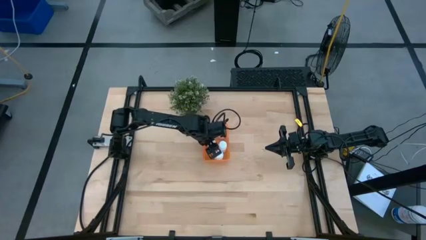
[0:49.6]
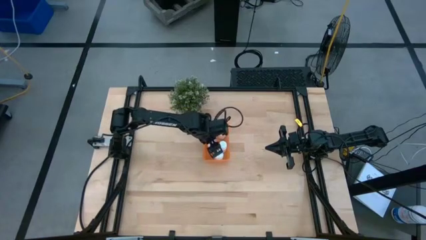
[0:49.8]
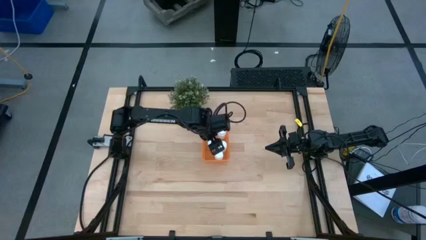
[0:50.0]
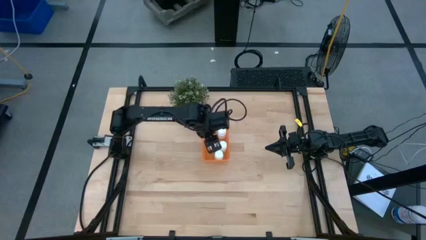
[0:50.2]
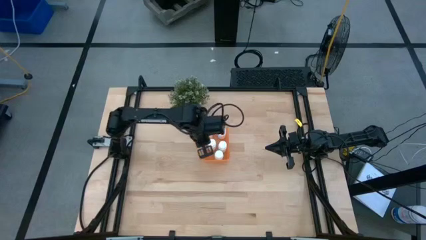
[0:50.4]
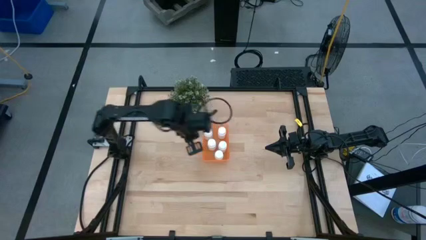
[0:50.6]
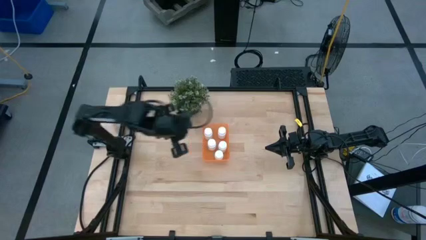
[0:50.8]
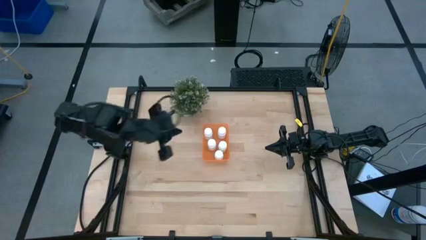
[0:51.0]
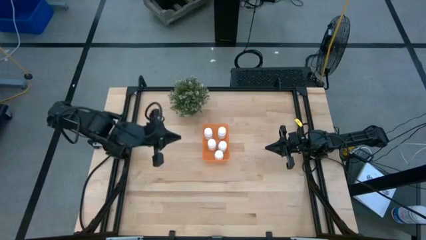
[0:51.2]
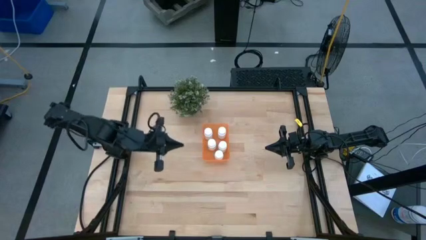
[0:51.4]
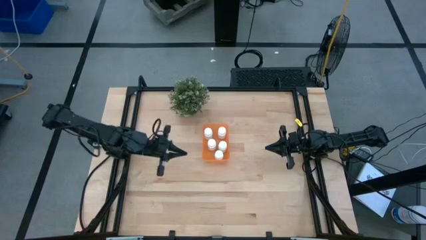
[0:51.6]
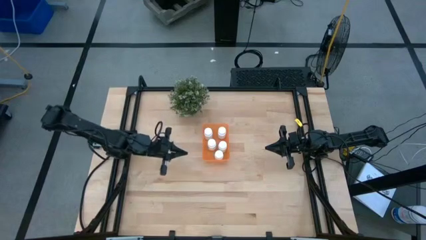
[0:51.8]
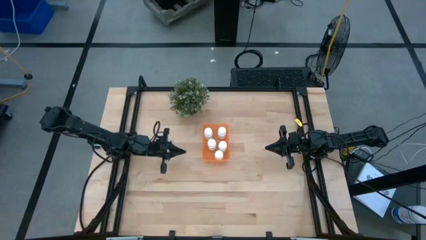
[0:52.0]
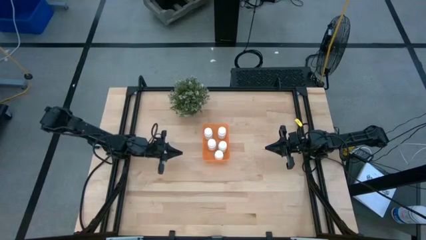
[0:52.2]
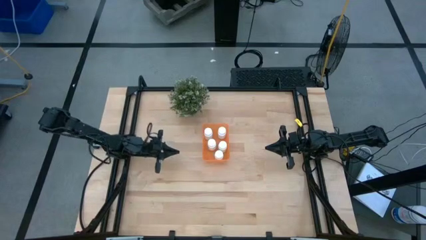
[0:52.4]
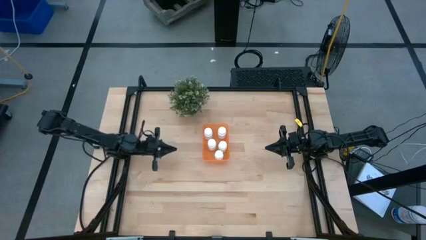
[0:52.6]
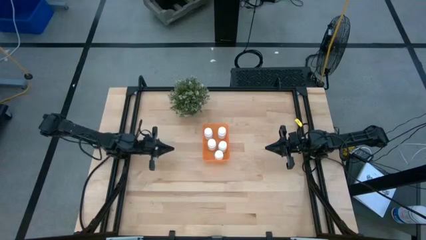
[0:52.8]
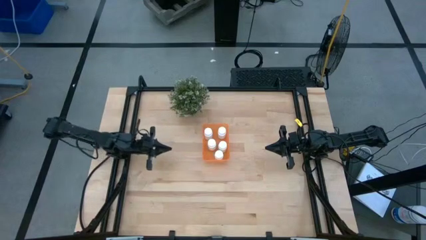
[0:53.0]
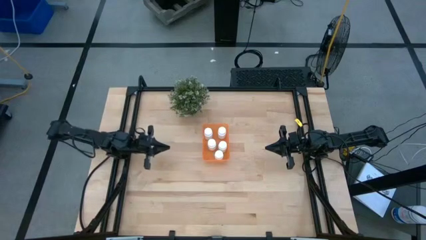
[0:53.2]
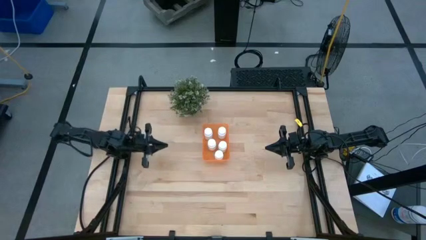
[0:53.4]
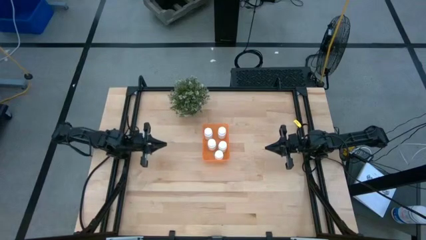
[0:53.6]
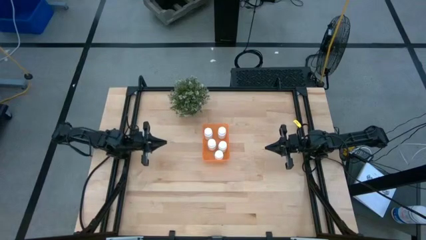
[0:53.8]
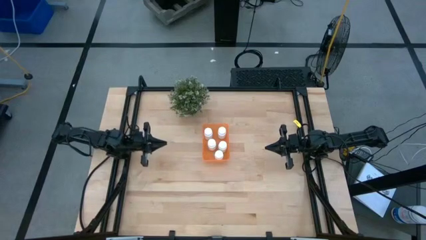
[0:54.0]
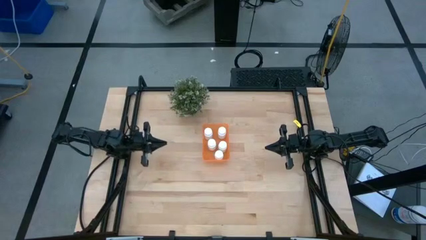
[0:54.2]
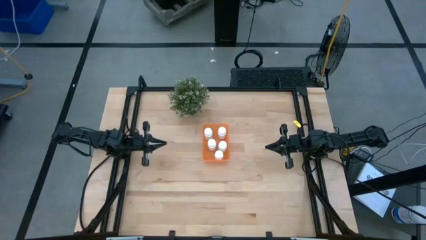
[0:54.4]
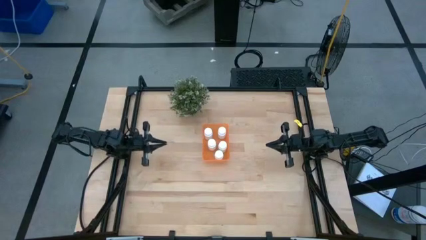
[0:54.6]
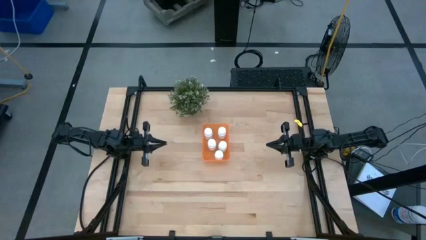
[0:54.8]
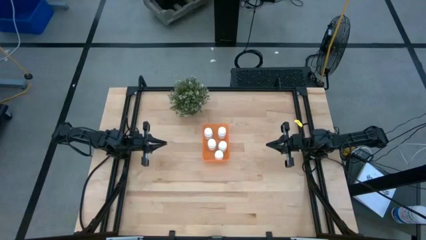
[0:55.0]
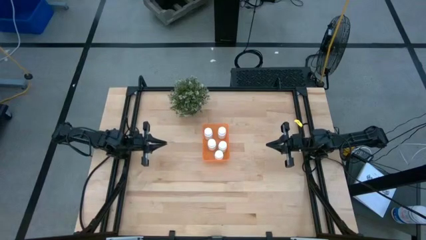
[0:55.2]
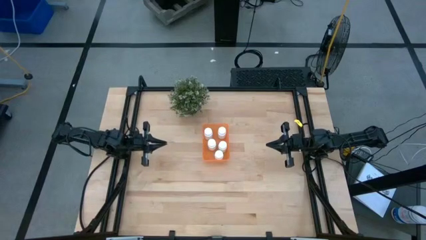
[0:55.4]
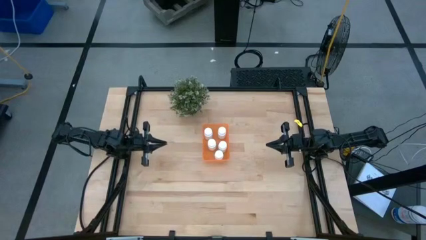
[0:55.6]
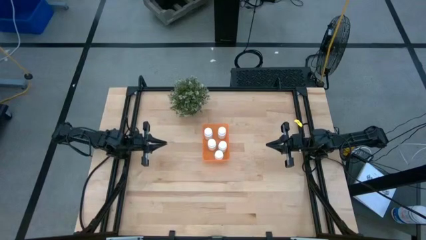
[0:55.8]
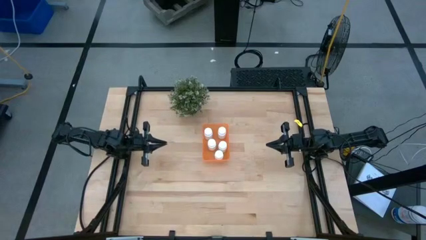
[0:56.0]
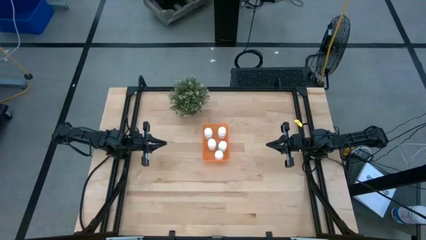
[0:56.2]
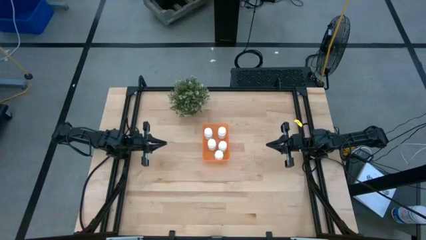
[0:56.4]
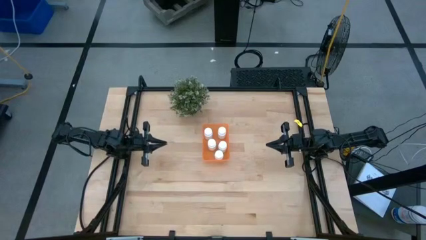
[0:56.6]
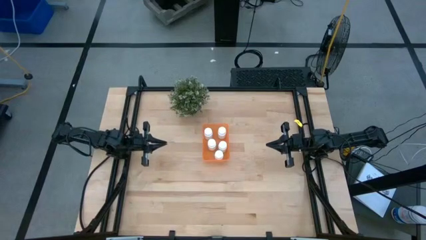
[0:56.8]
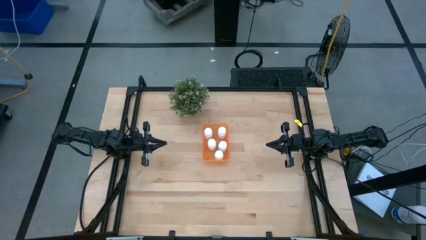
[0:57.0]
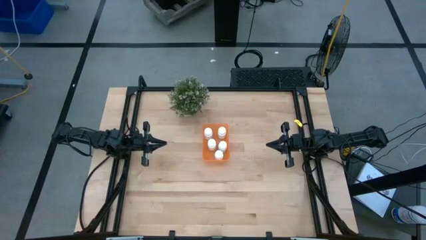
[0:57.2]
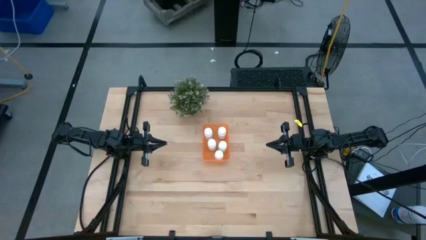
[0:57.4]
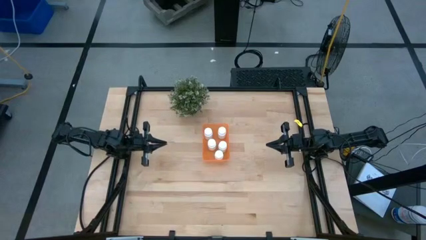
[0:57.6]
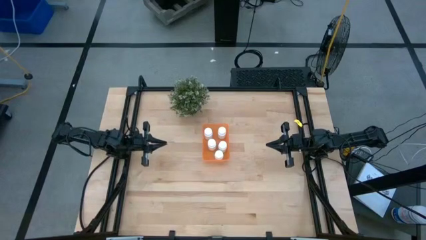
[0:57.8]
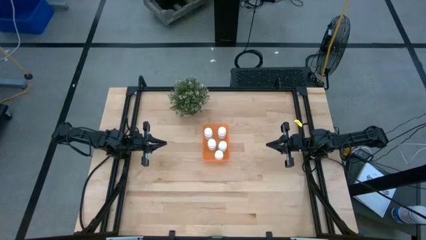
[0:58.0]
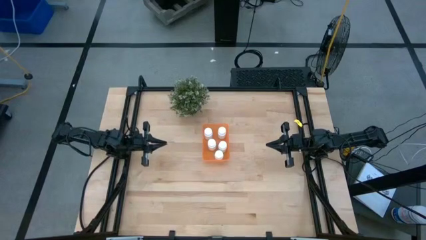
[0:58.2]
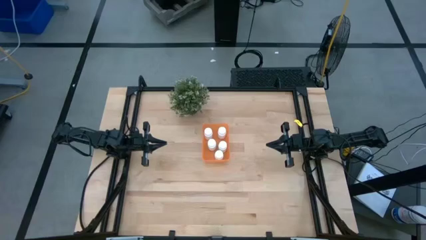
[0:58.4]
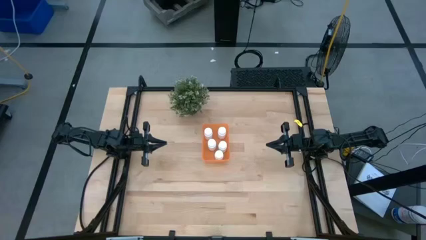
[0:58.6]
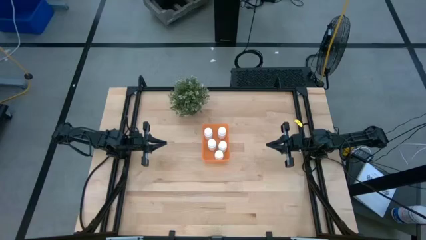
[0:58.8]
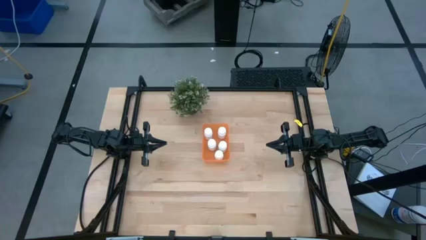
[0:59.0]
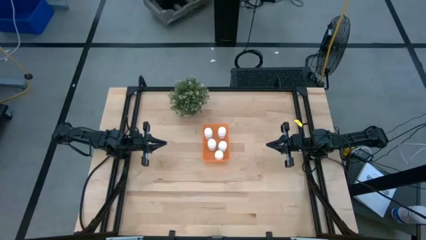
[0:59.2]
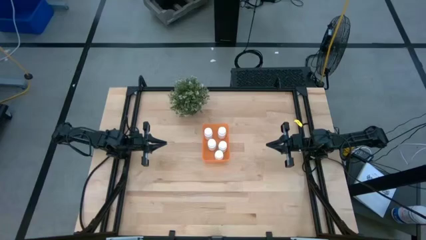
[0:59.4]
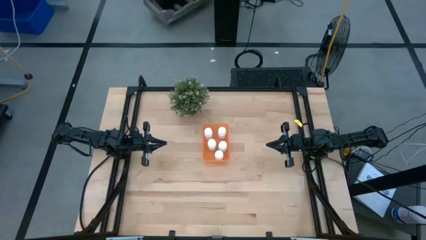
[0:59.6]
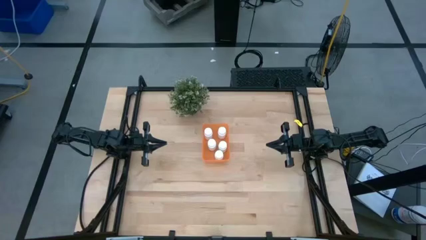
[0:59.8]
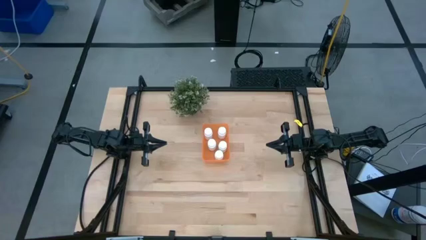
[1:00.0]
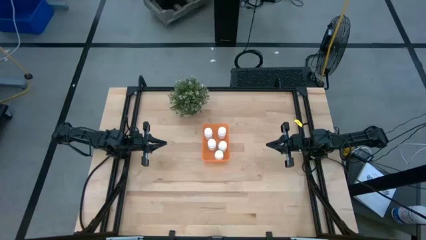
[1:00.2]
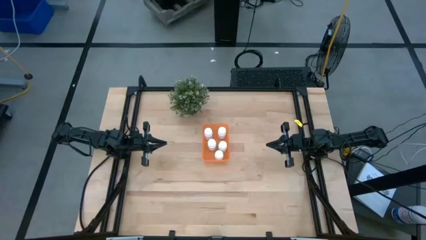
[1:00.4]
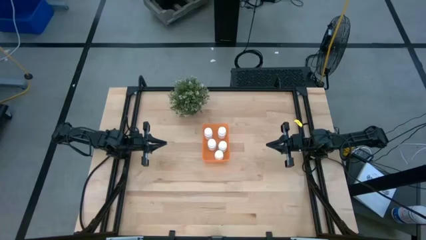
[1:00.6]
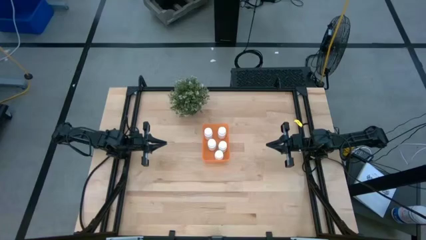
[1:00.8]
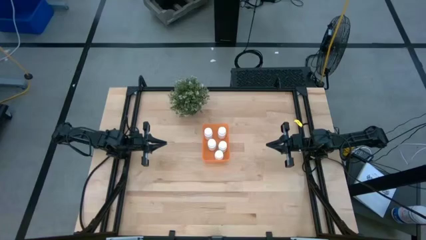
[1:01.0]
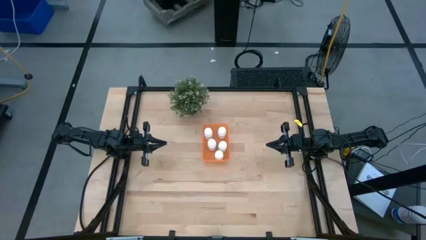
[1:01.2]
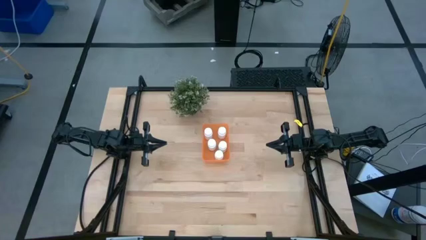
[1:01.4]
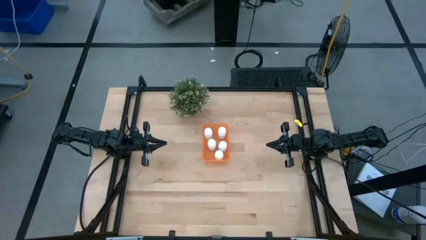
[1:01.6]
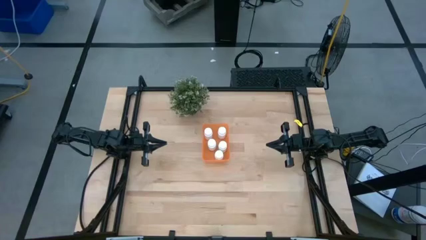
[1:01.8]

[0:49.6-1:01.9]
Task: Pick and place pill bottles into a basket
Return to Home Position
